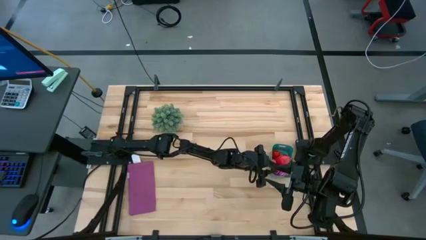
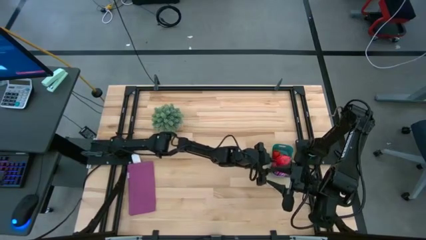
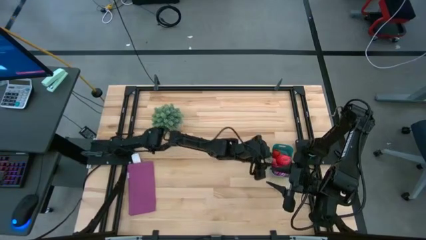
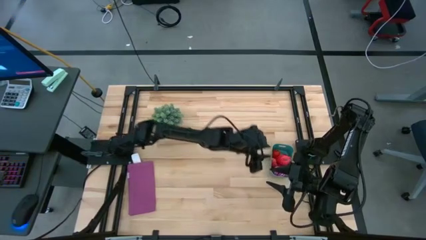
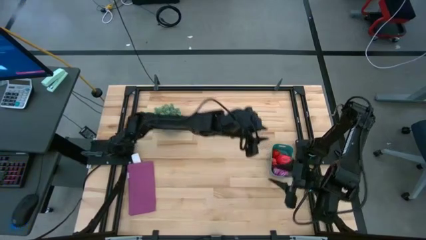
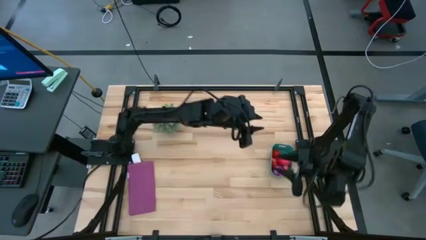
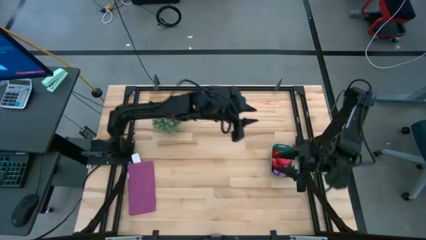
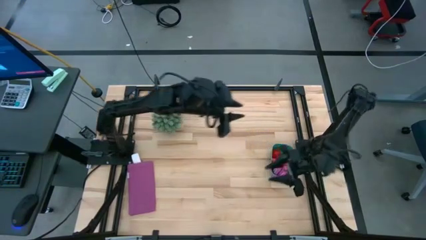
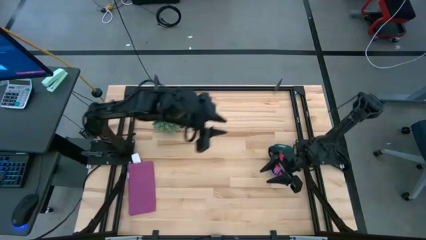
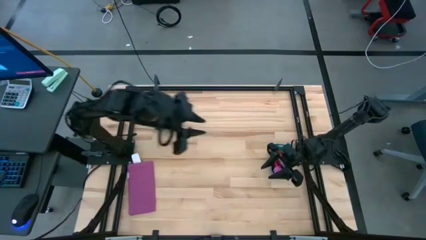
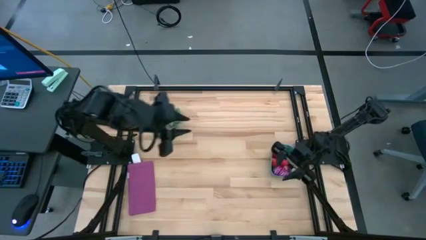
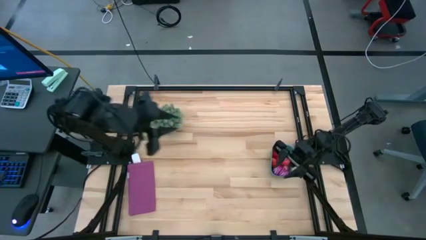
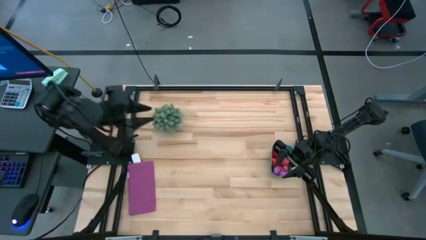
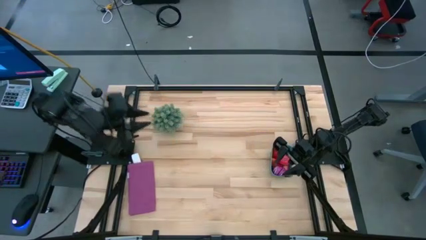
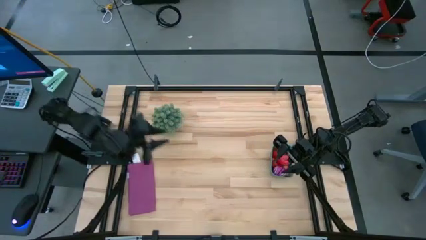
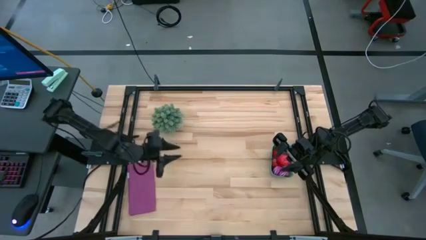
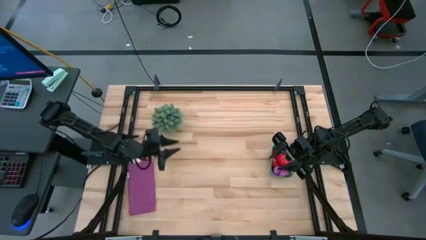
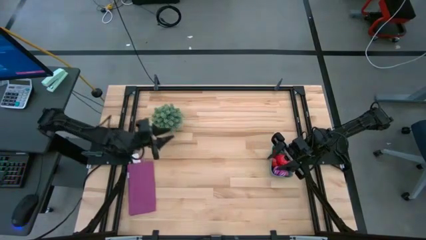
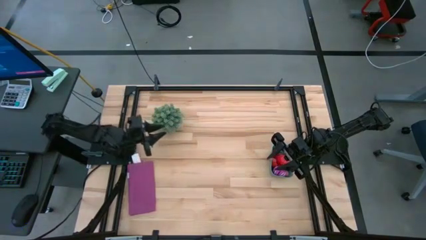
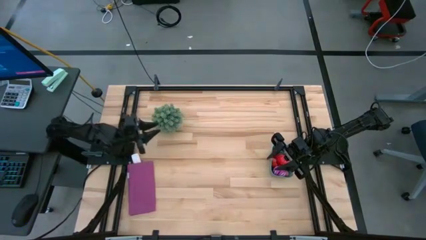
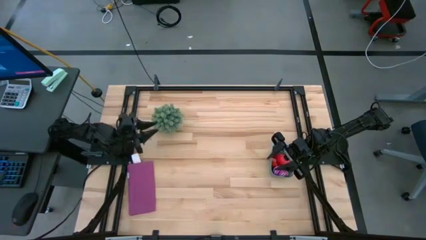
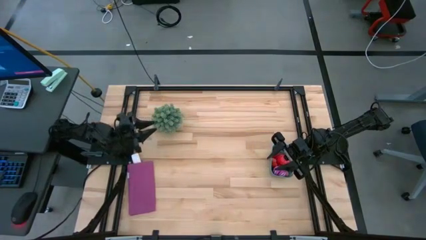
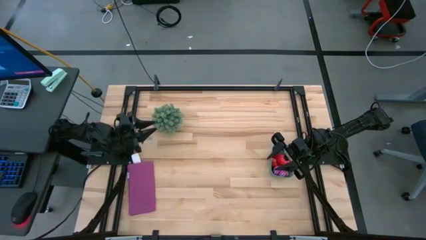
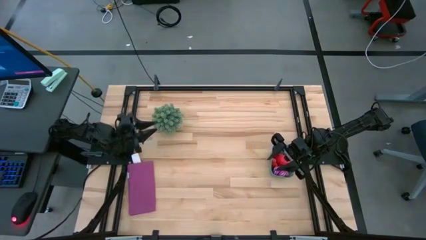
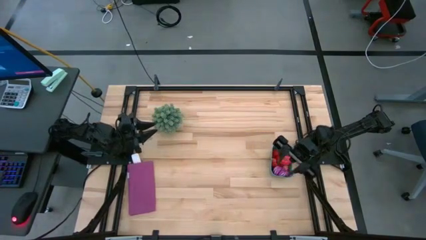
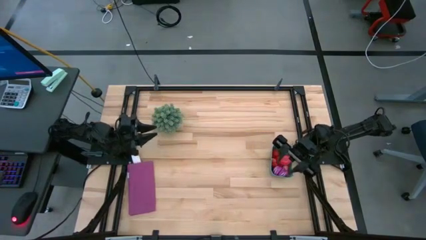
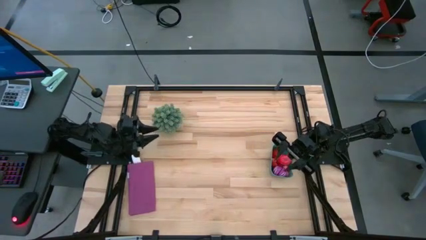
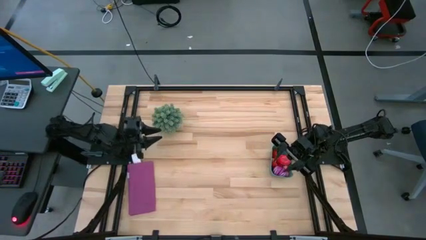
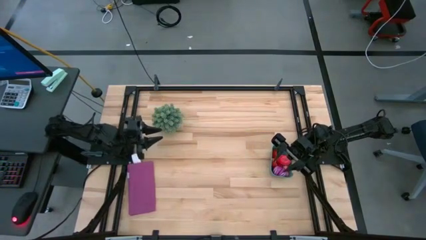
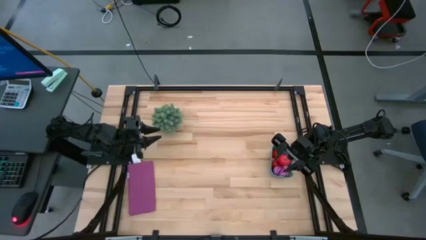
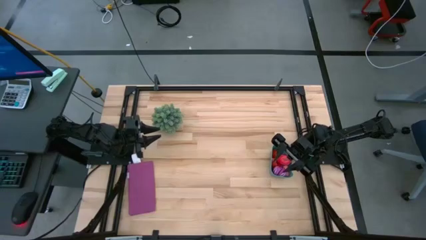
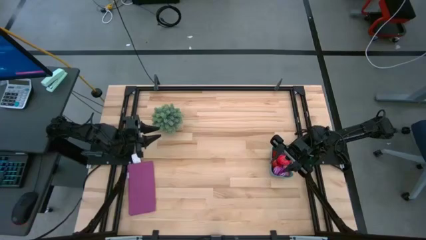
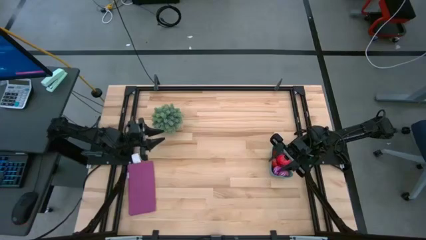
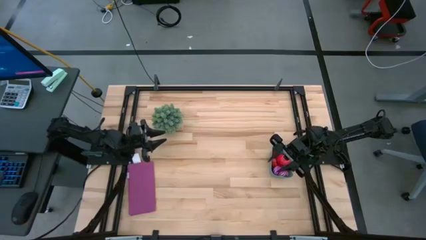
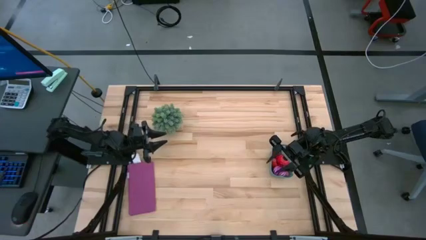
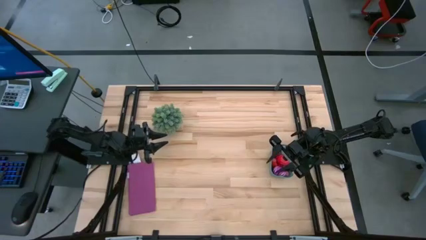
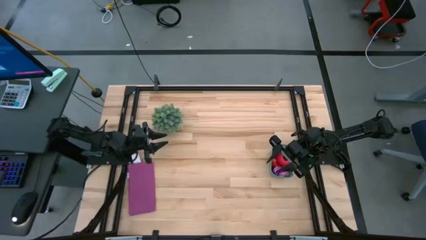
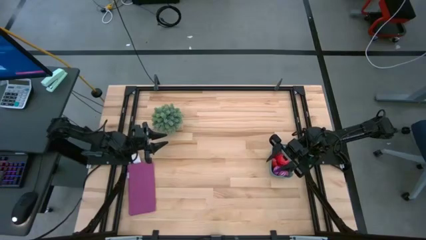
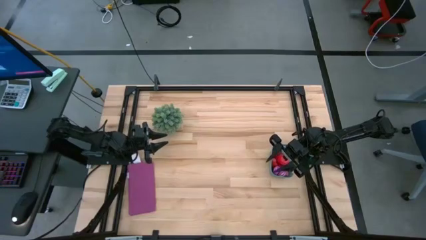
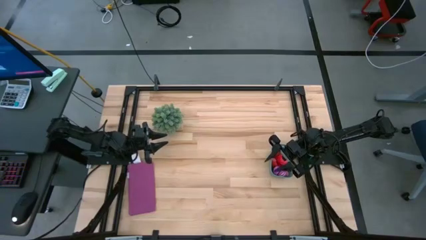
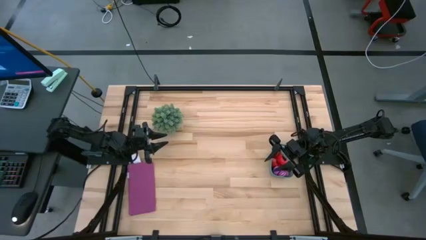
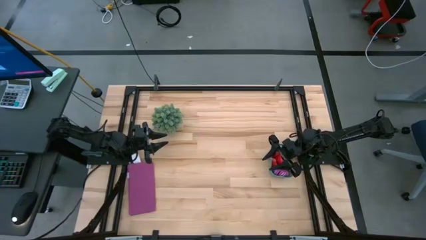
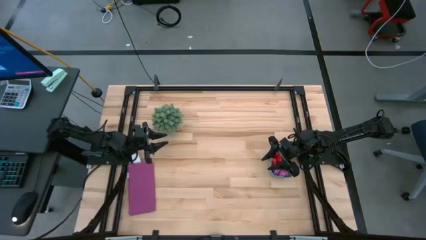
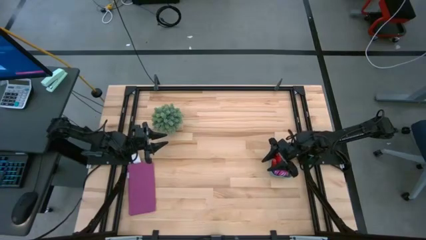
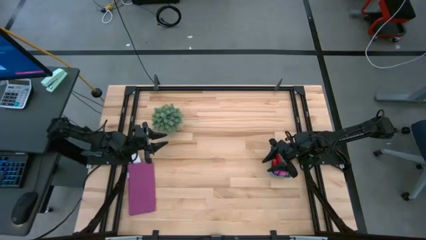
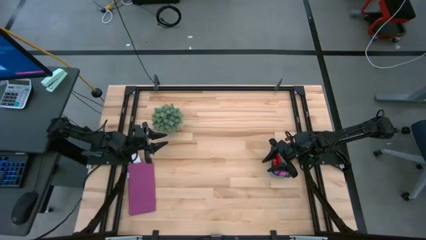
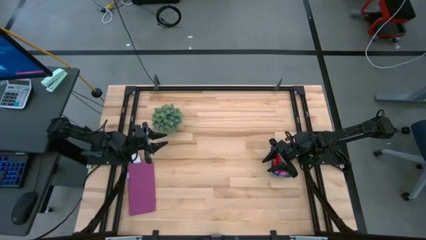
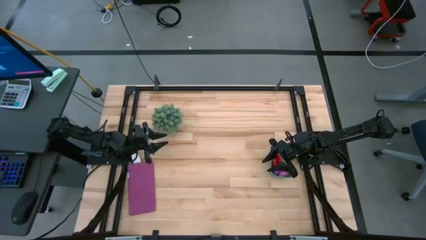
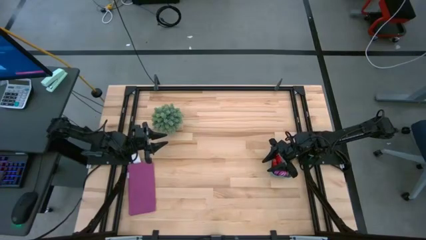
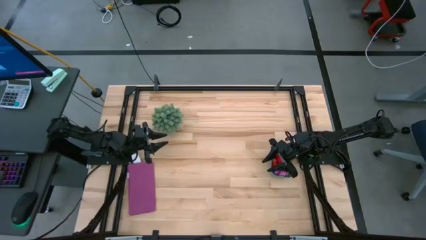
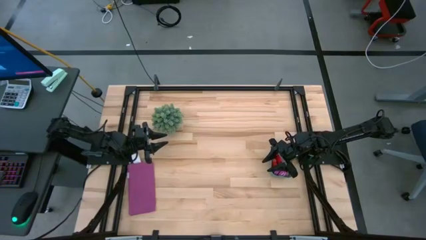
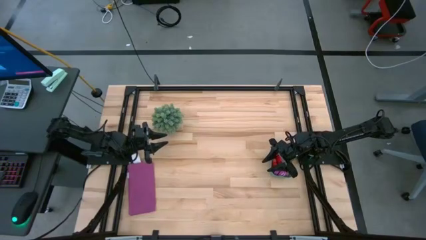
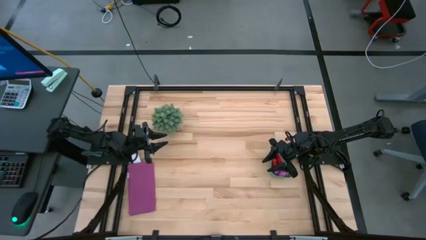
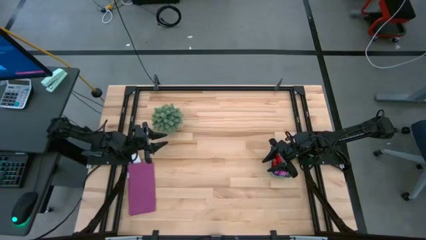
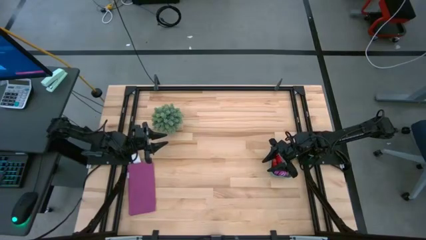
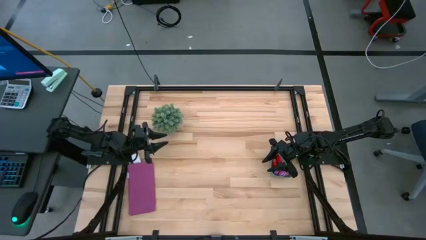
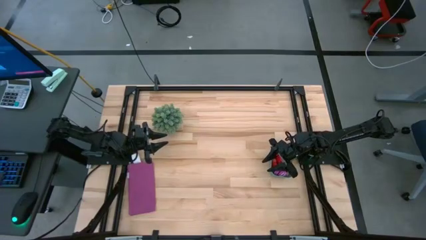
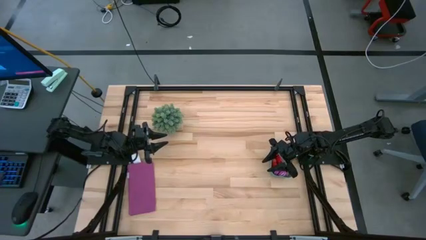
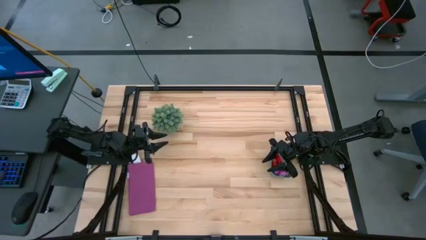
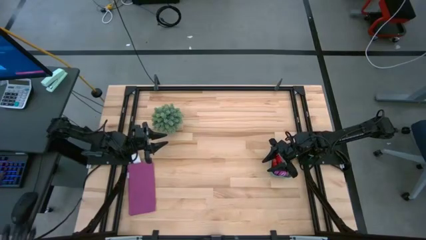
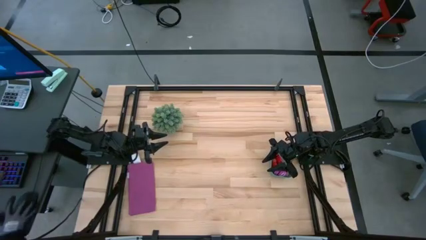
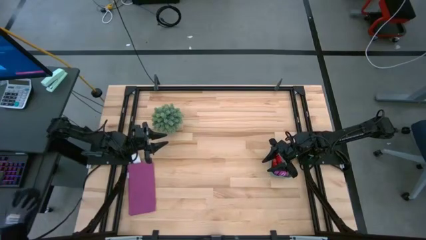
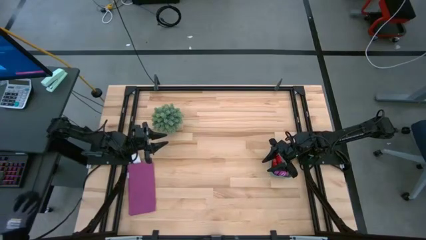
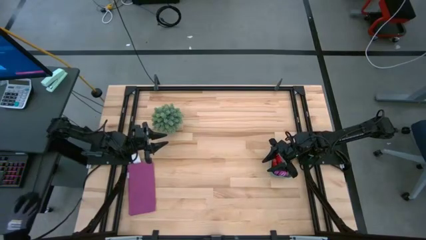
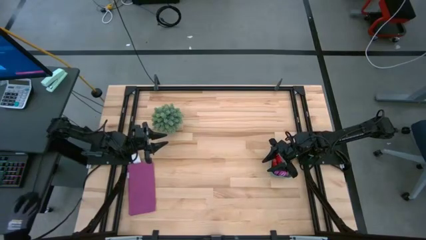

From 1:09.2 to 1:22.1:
Task: Pick and placing Produce into tupperware
Return to Home Position
